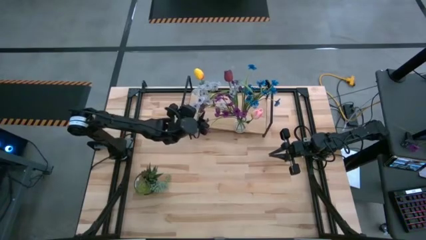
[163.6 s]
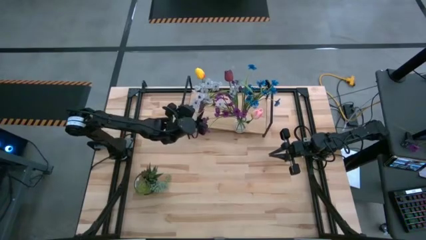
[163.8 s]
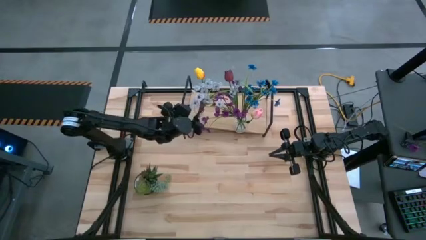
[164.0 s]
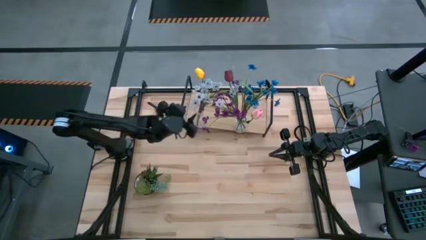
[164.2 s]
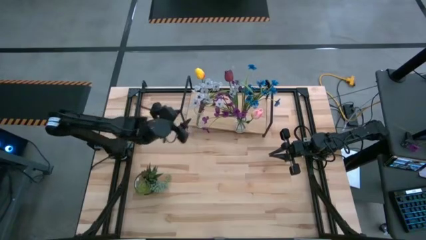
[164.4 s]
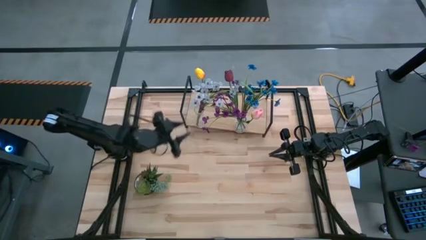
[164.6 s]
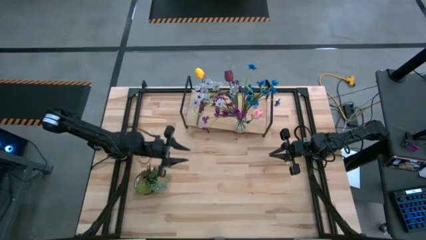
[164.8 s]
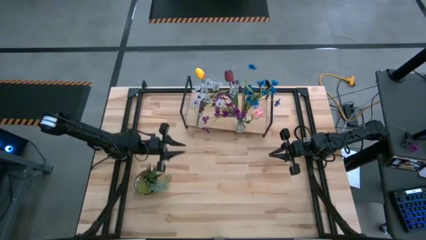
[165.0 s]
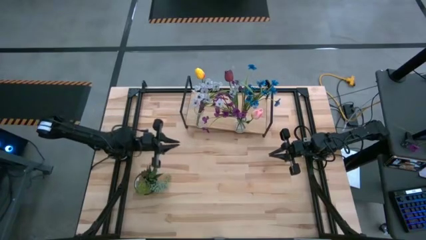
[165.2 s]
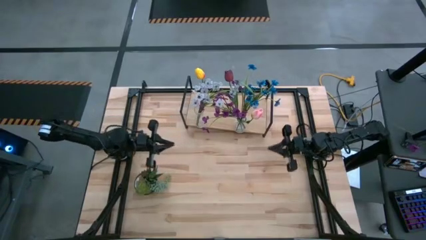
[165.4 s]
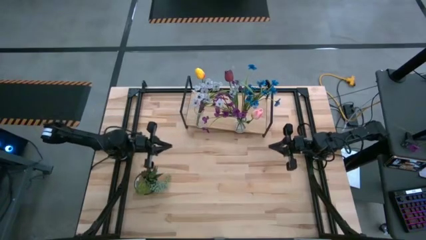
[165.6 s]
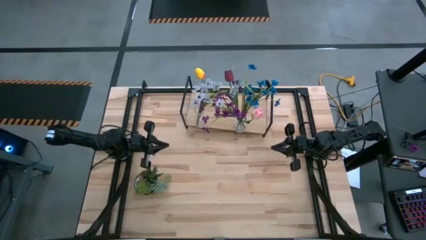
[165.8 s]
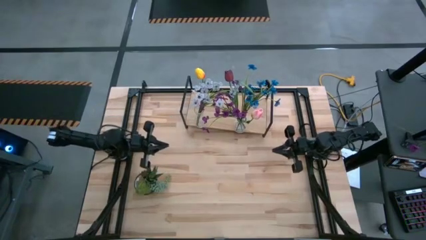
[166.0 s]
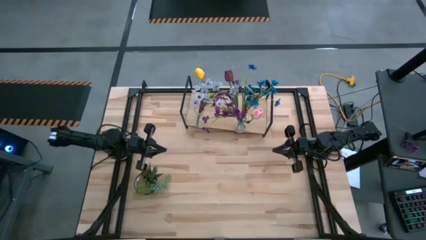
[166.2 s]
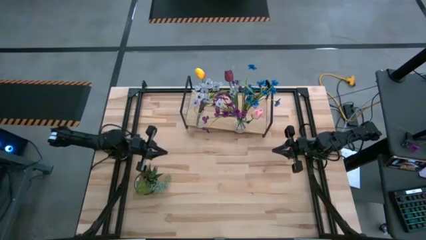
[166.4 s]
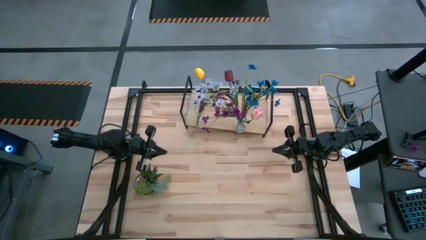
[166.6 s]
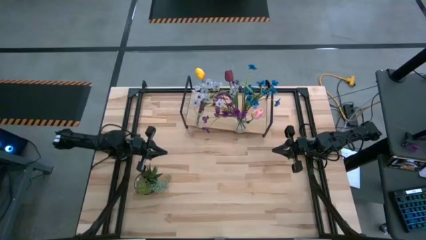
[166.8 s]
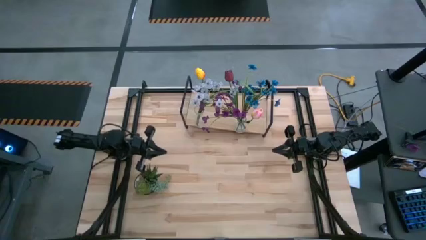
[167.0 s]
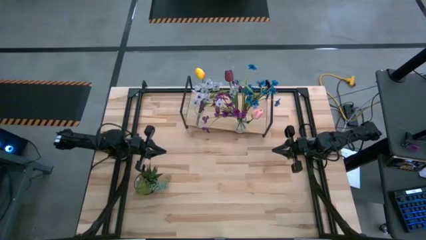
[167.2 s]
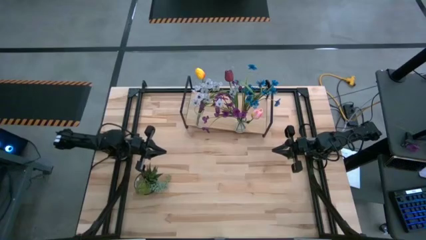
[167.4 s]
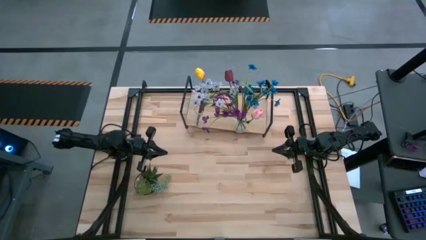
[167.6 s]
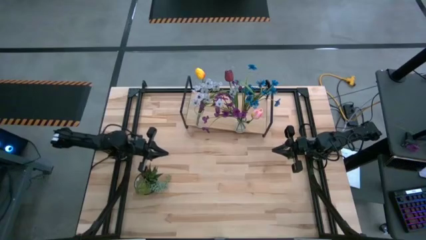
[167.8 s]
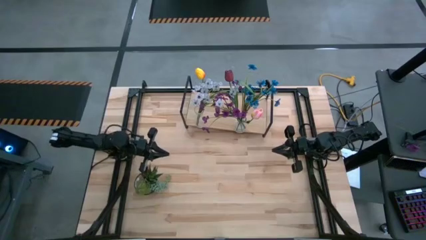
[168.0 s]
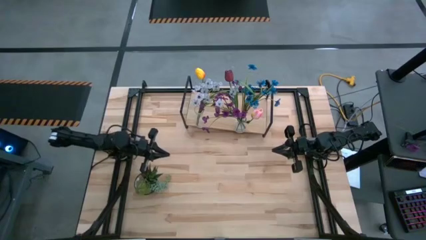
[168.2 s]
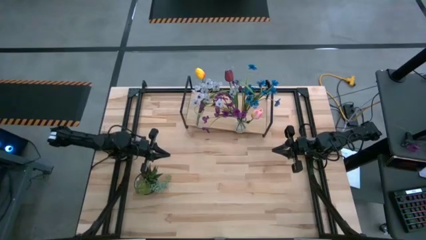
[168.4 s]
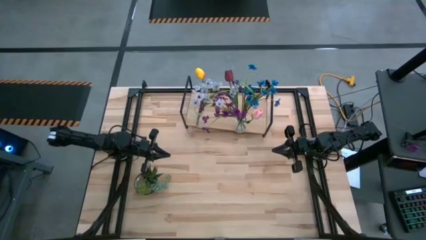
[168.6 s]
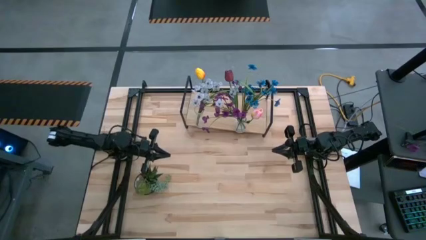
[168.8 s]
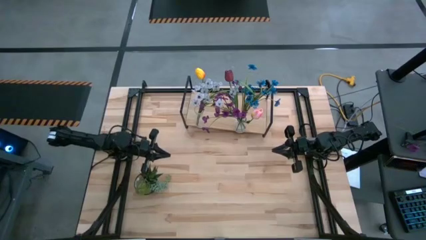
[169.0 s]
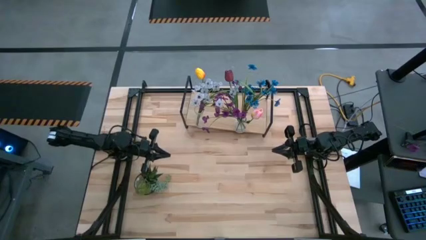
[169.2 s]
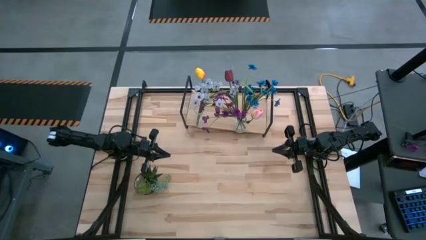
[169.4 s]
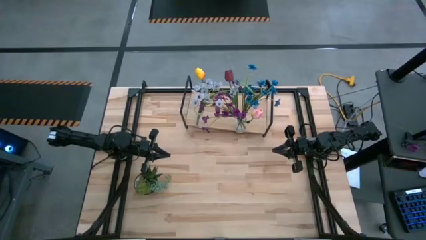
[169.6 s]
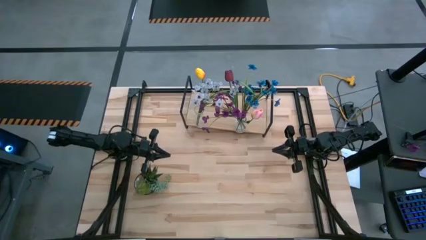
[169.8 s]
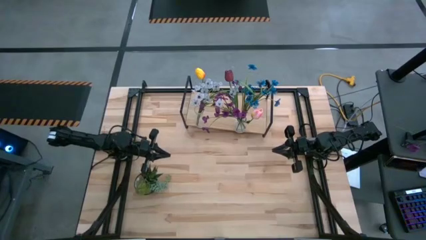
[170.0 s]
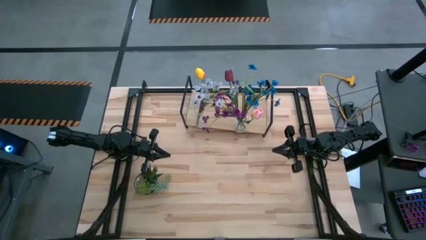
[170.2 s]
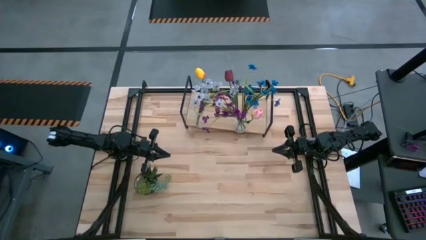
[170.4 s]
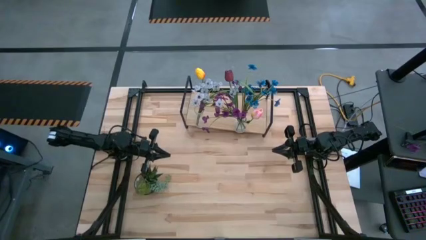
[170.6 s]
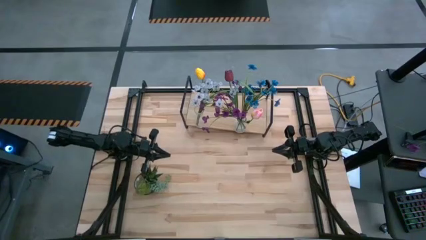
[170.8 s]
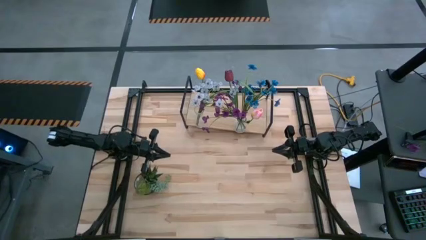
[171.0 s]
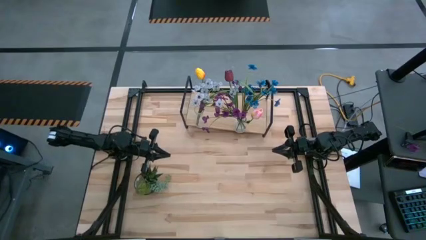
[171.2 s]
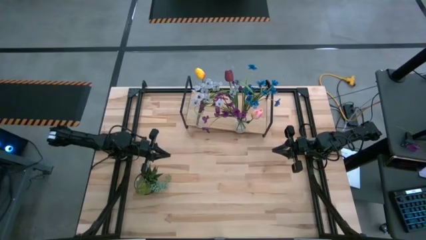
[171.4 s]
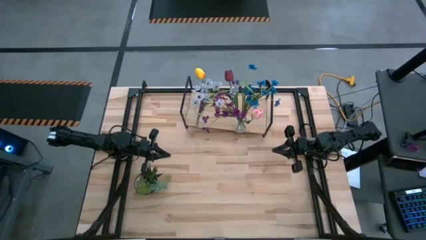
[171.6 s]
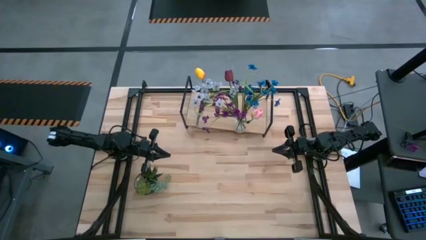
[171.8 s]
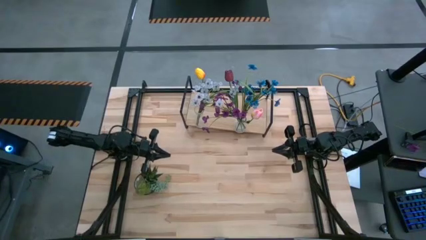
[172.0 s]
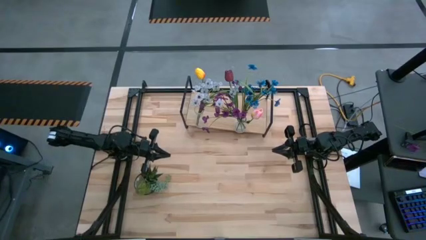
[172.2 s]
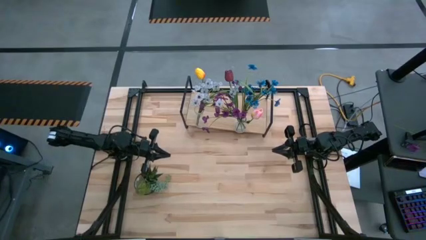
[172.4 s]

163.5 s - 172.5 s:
Task: Pick and place flowers into a vace then onto a shelf
Return to Home Position

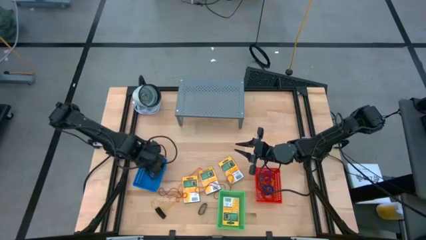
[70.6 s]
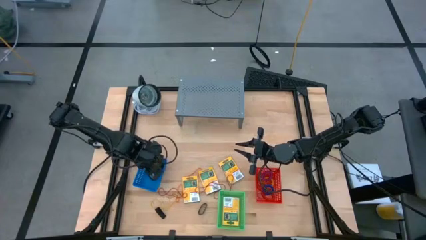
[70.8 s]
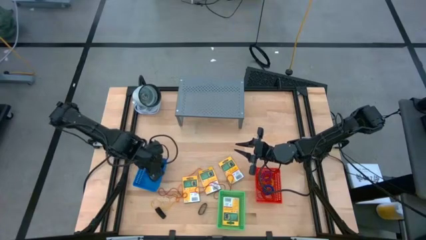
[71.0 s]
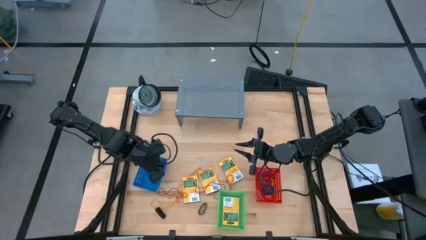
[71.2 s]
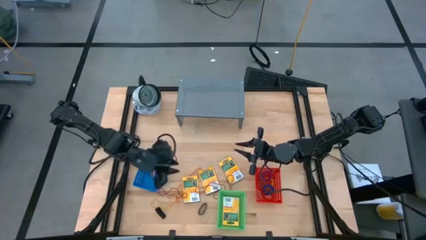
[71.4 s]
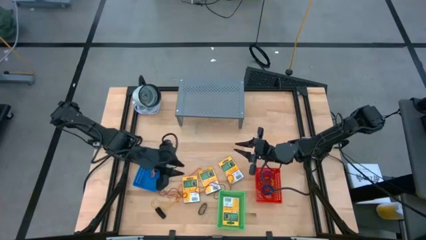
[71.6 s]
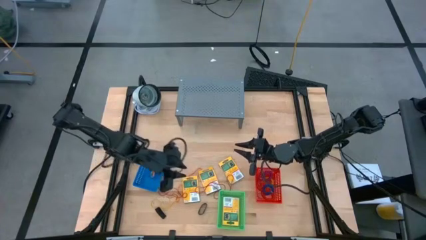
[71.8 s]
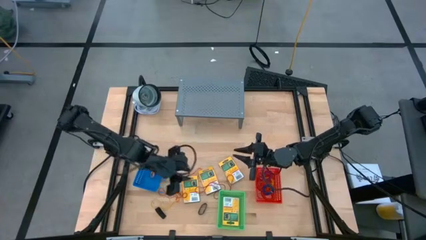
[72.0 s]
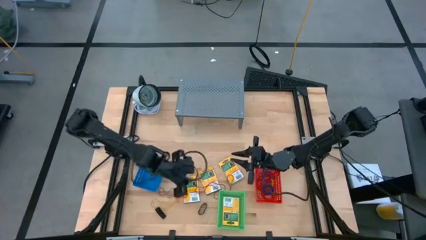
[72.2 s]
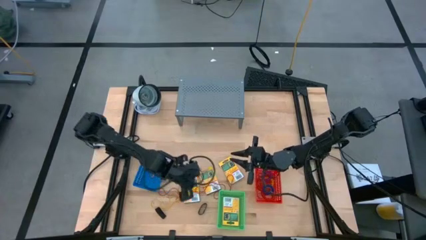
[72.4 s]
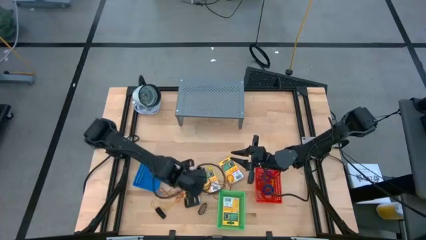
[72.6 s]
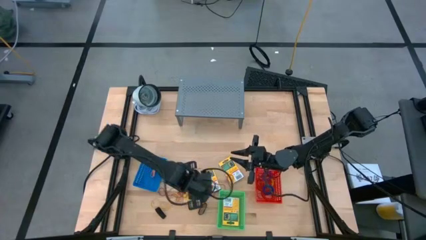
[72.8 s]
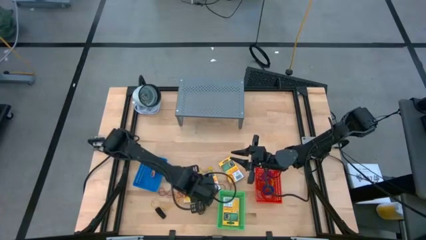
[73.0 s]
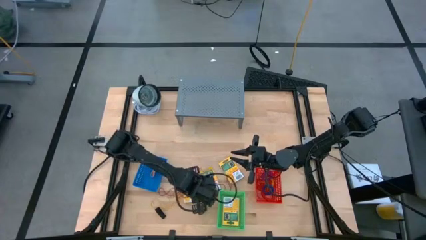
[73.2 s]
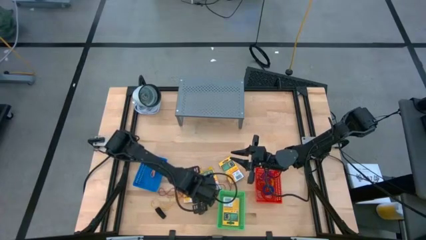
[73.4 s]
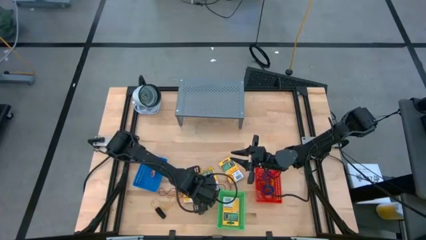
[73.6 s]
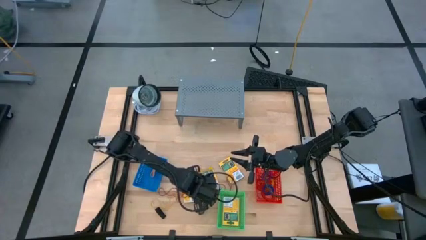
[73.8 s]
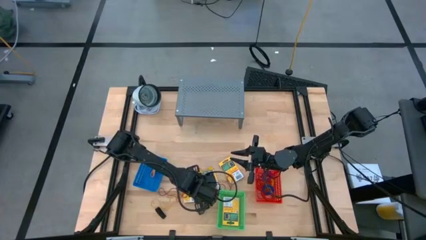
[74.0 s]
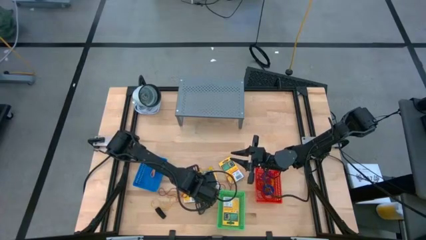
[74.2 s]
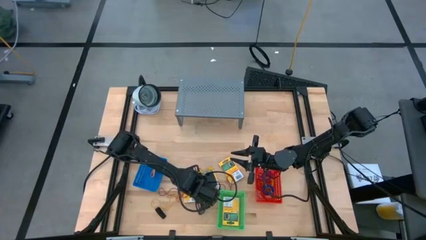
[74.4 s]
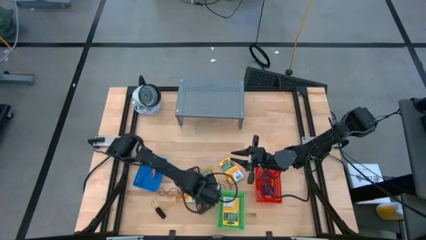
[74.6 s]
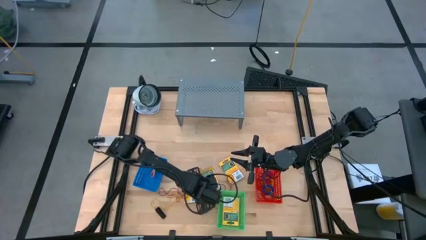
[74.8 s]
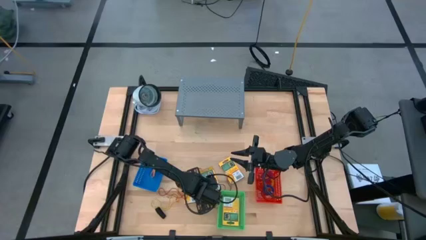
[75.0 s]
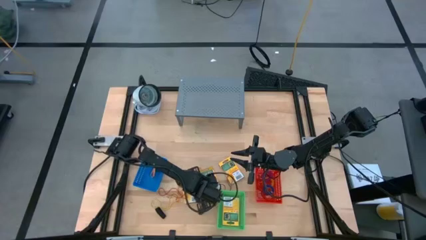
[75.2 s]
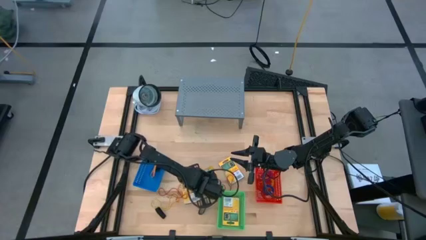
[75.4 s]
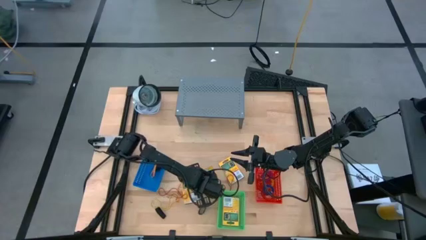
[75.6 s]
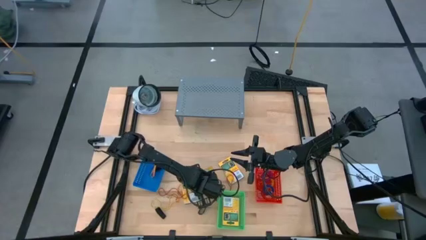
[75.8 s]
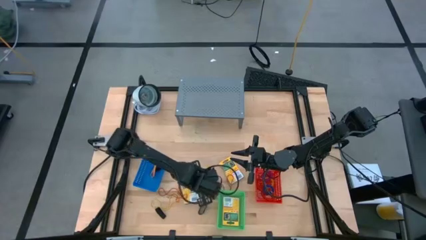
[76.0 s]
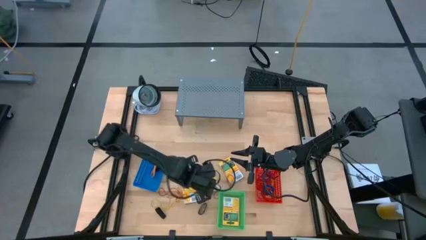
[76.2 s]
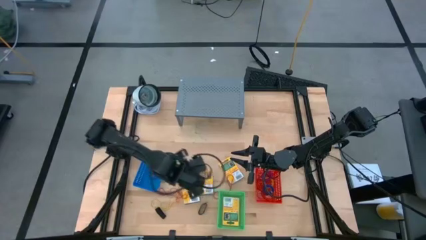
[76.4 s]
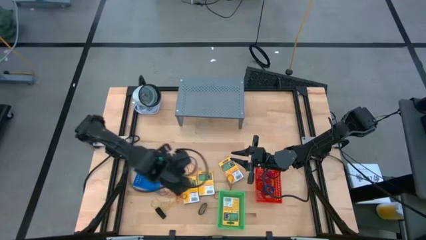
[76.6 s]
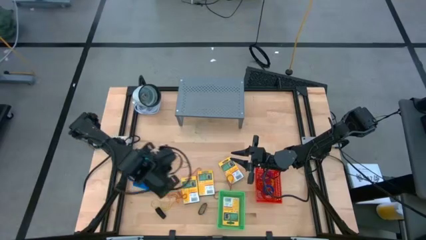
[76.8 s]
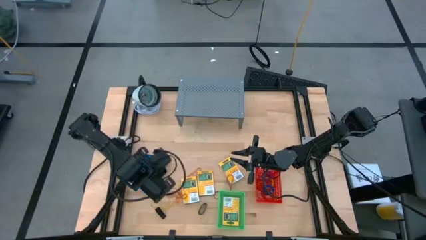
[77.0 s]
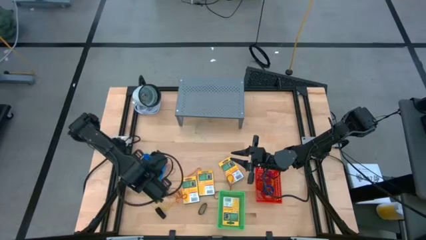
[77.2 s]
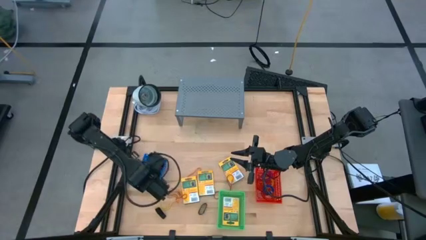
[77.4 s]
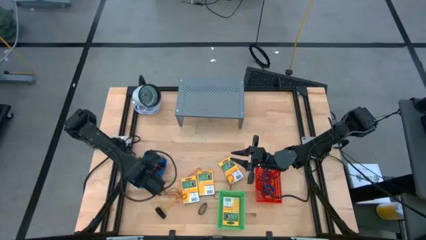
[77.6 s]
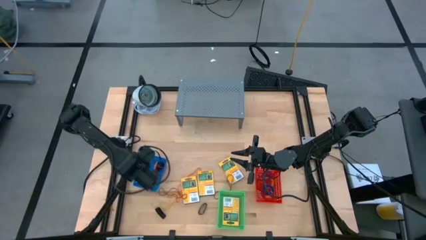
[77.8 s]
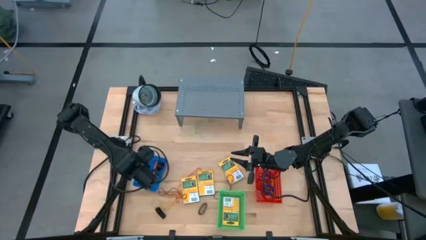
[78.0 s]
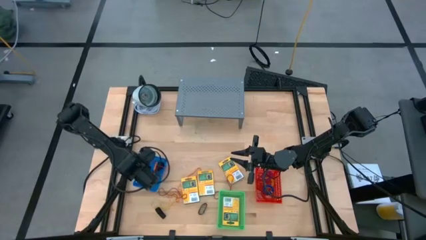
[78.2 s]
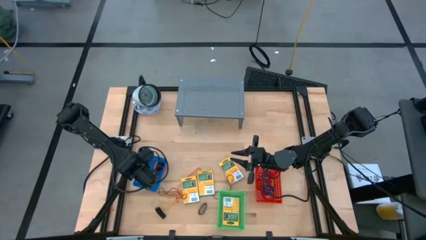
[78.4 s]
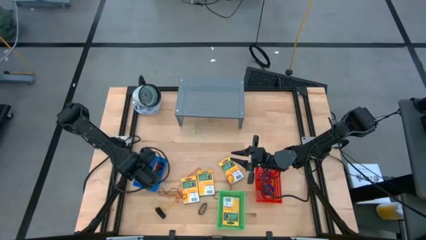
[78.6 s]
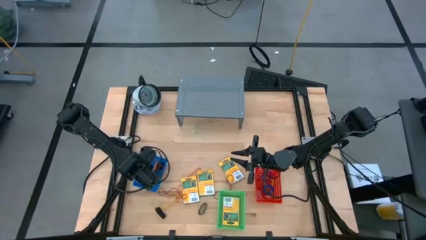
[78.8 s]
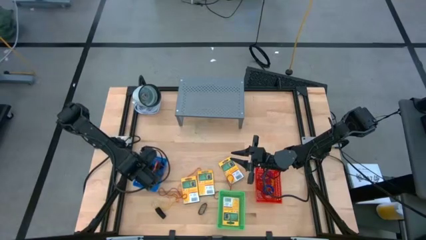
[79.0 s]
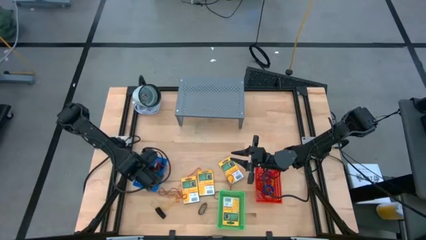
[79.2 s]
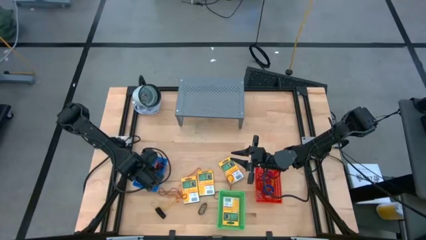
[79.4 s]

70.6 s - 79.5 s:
Task: Pick & Place Office Desk Supplies
Put the red rubber band into the blue bin
